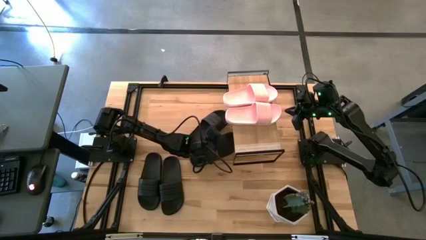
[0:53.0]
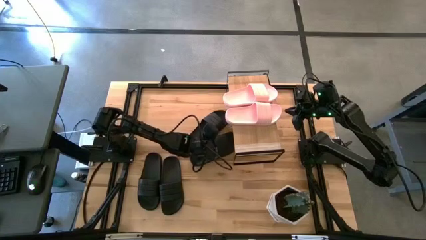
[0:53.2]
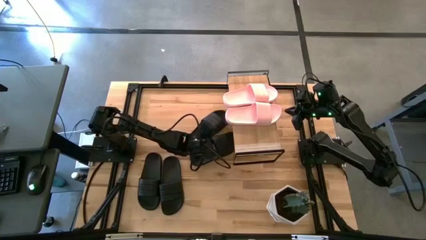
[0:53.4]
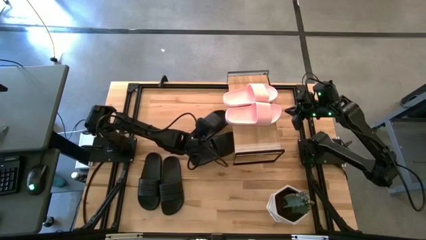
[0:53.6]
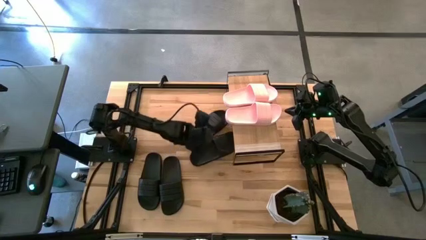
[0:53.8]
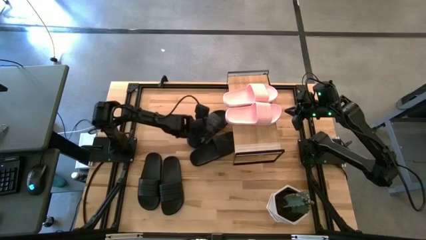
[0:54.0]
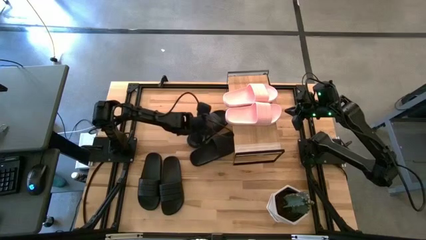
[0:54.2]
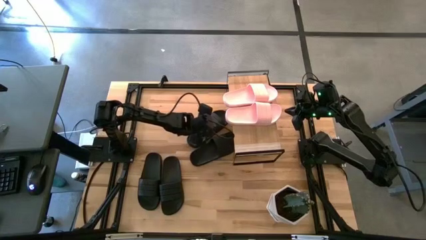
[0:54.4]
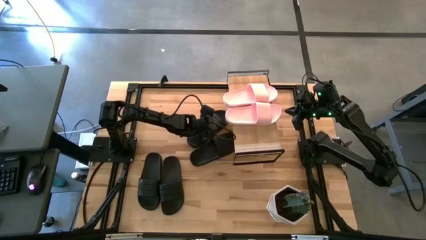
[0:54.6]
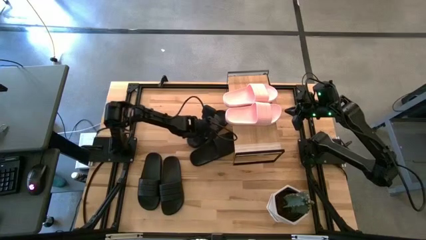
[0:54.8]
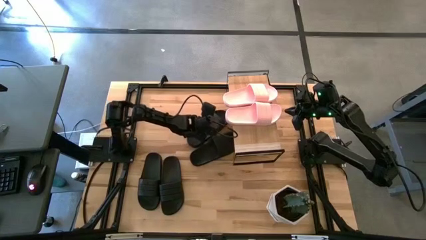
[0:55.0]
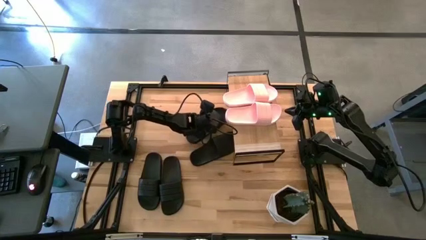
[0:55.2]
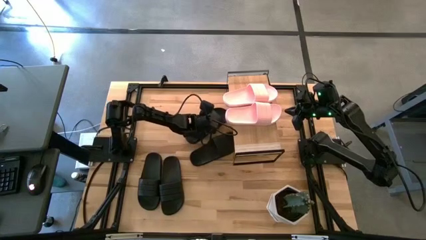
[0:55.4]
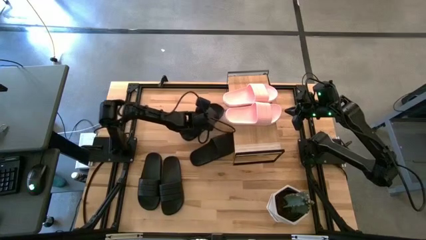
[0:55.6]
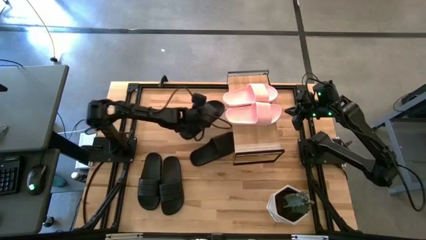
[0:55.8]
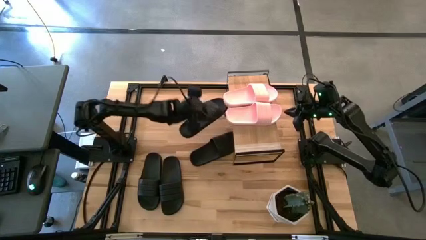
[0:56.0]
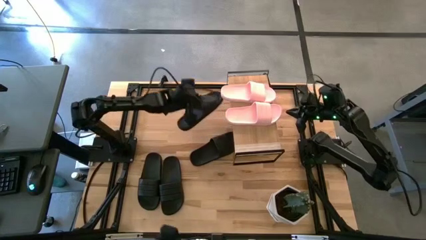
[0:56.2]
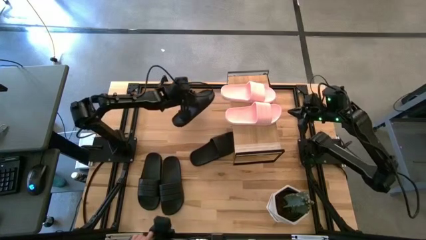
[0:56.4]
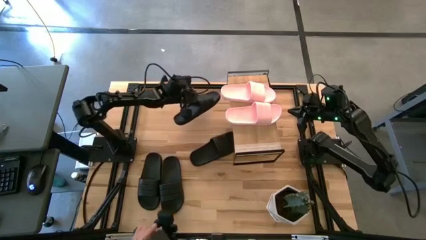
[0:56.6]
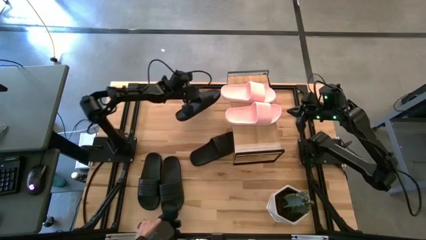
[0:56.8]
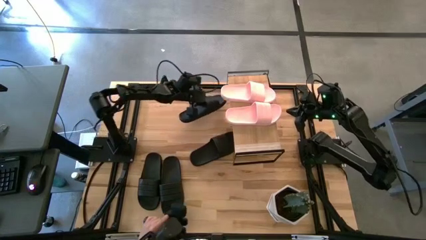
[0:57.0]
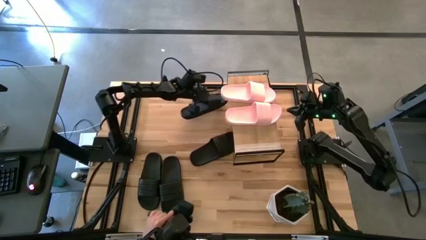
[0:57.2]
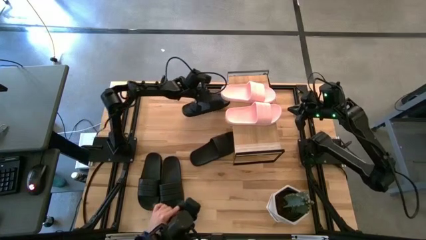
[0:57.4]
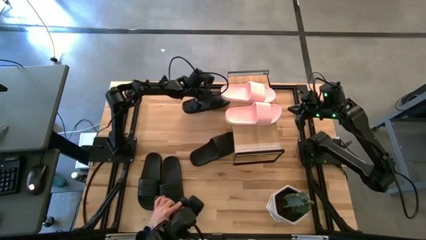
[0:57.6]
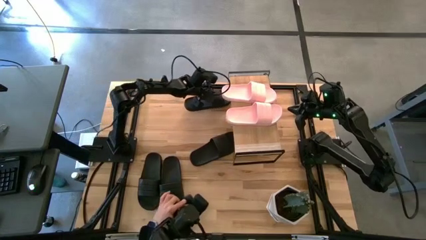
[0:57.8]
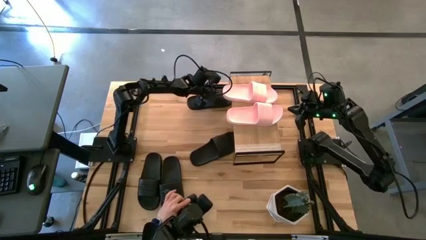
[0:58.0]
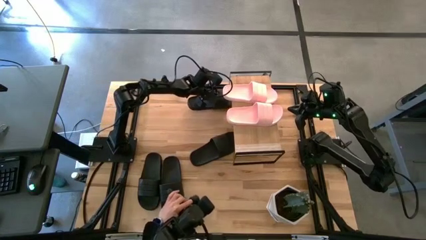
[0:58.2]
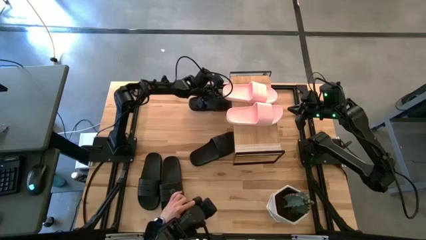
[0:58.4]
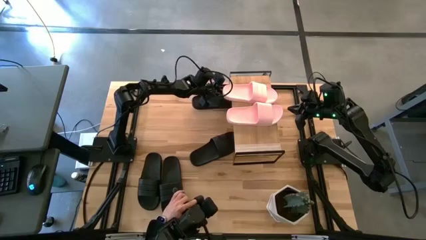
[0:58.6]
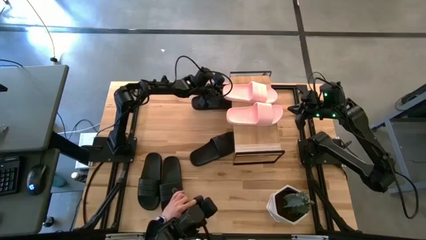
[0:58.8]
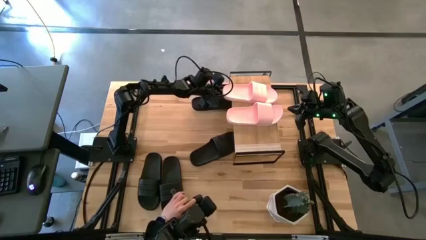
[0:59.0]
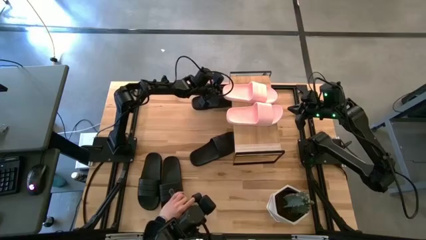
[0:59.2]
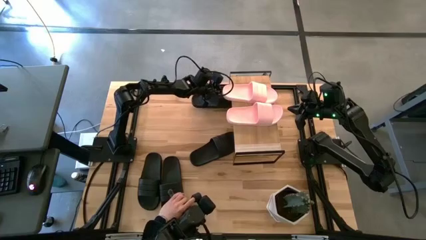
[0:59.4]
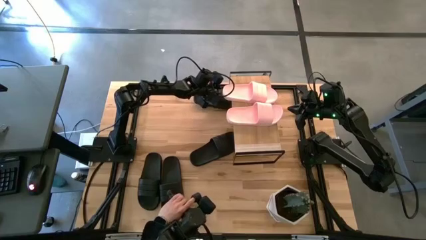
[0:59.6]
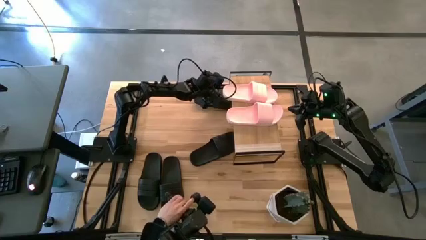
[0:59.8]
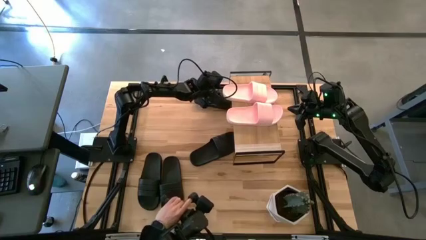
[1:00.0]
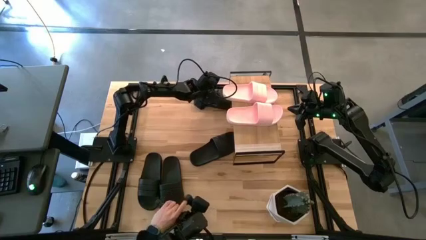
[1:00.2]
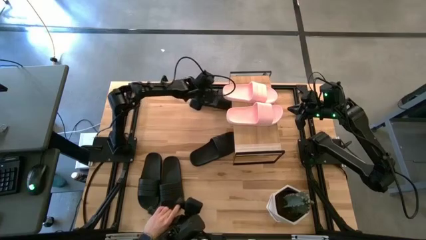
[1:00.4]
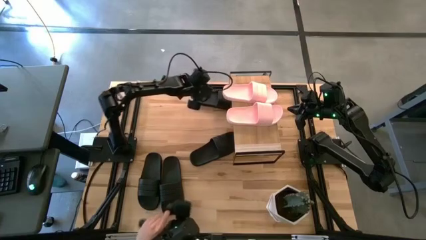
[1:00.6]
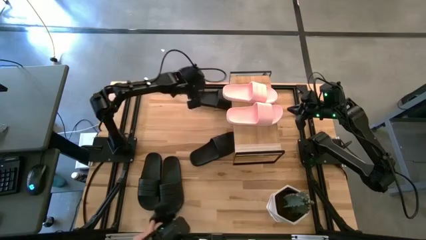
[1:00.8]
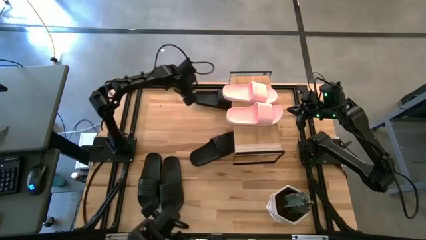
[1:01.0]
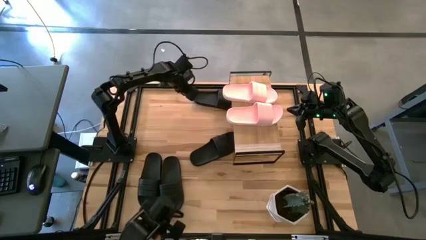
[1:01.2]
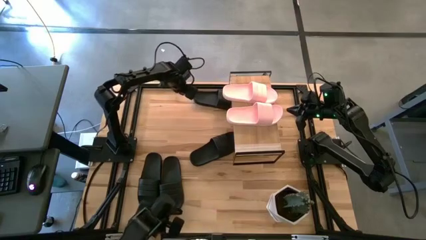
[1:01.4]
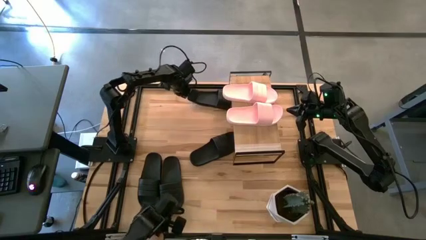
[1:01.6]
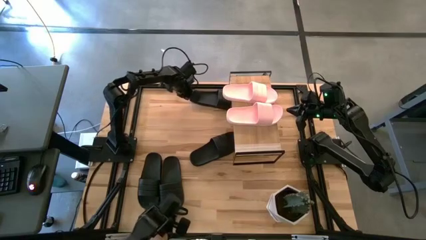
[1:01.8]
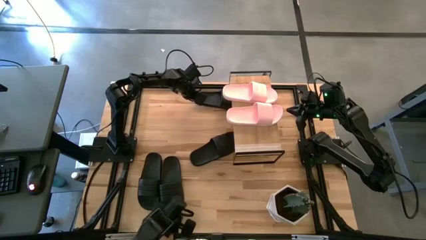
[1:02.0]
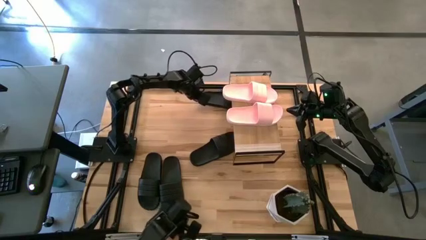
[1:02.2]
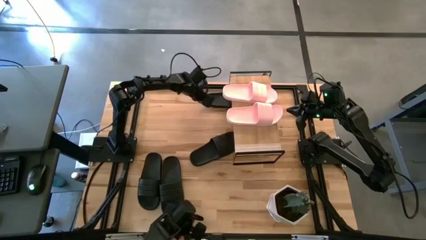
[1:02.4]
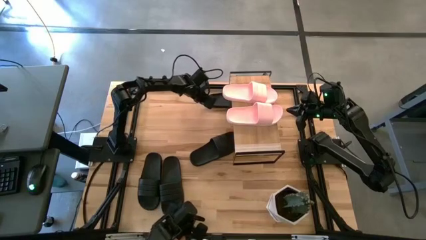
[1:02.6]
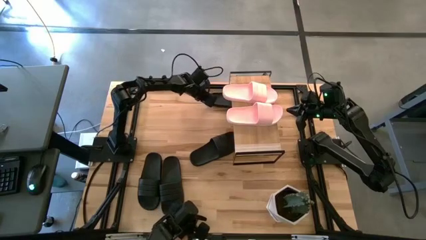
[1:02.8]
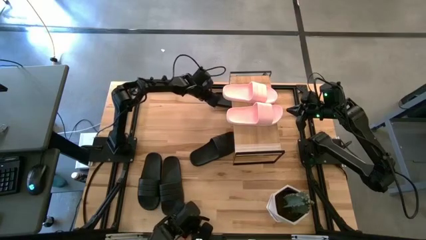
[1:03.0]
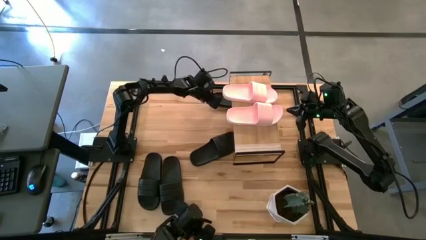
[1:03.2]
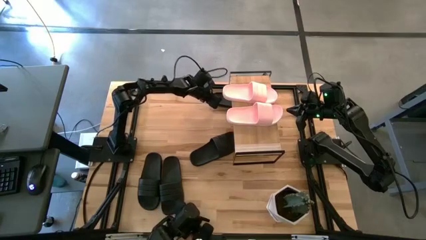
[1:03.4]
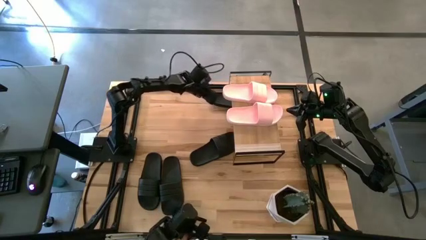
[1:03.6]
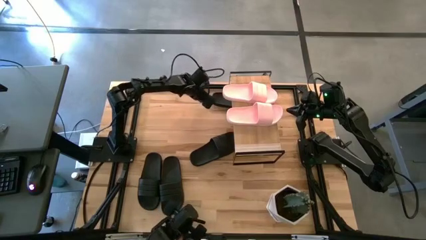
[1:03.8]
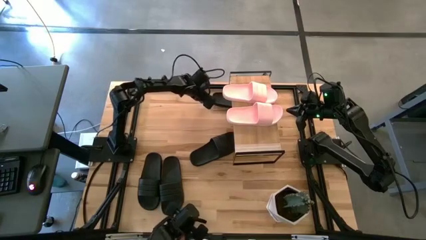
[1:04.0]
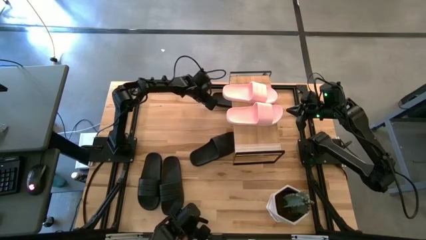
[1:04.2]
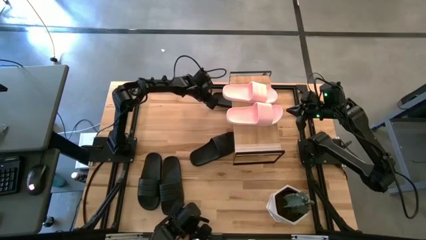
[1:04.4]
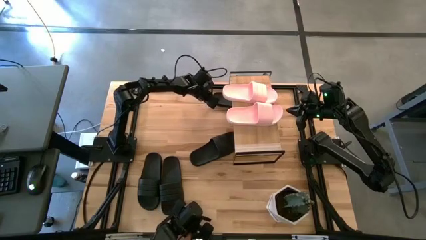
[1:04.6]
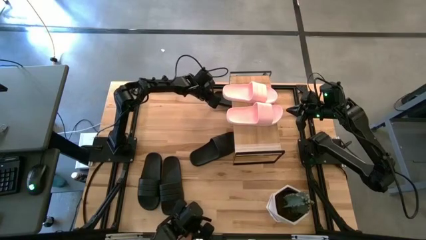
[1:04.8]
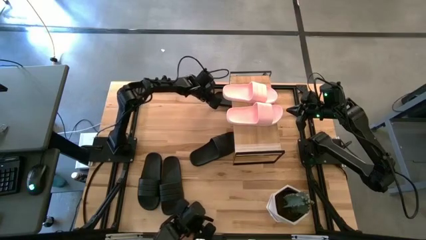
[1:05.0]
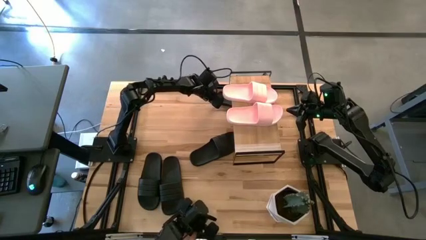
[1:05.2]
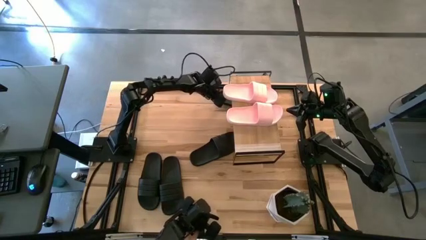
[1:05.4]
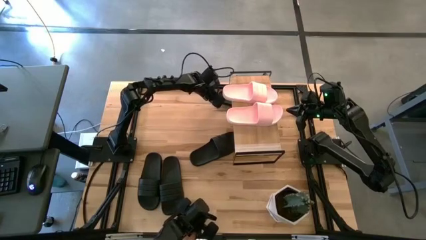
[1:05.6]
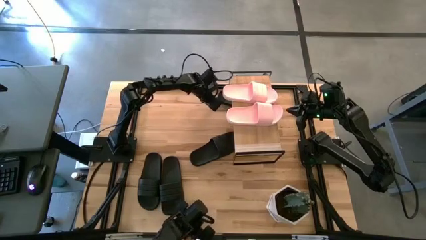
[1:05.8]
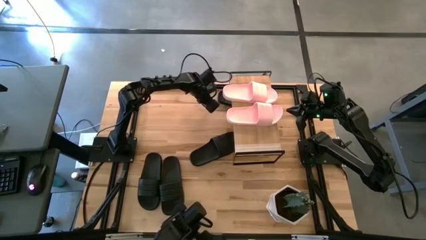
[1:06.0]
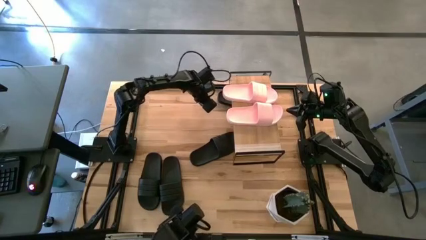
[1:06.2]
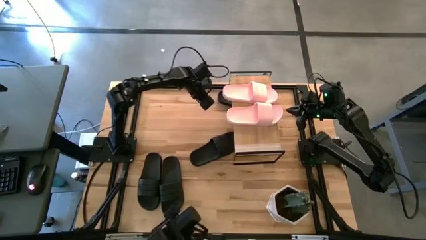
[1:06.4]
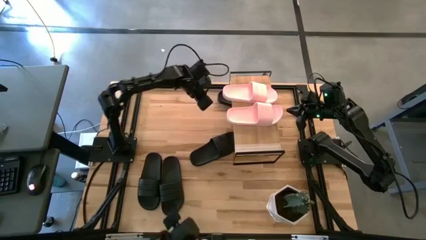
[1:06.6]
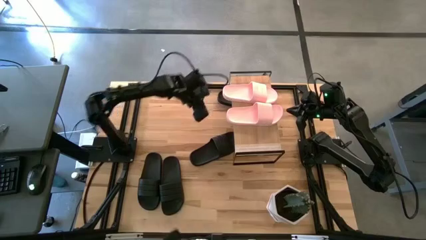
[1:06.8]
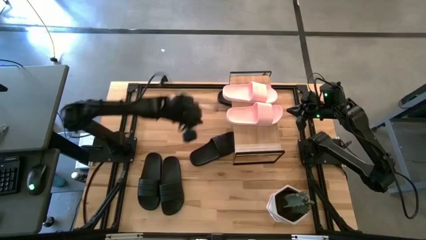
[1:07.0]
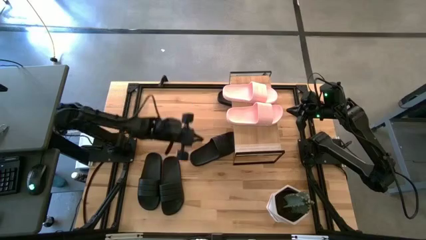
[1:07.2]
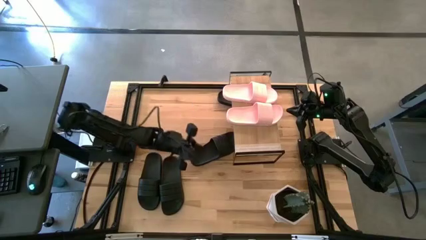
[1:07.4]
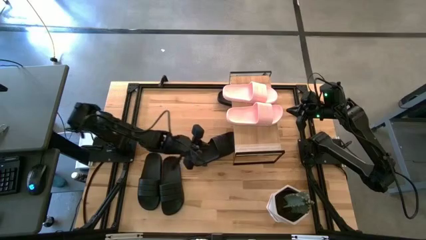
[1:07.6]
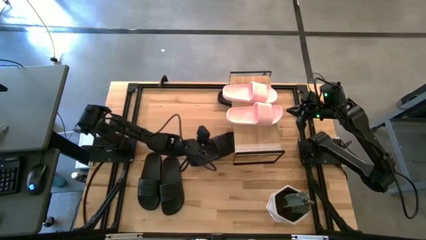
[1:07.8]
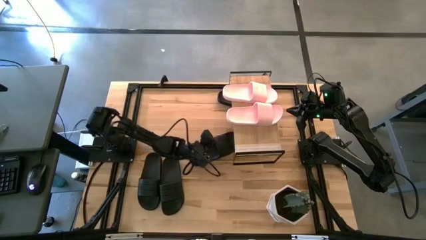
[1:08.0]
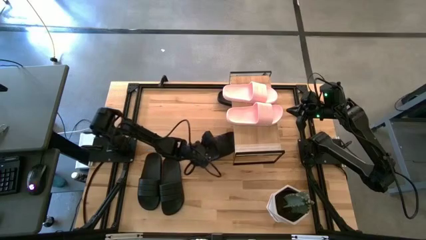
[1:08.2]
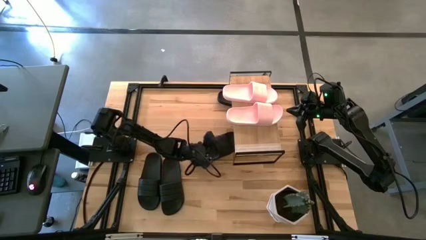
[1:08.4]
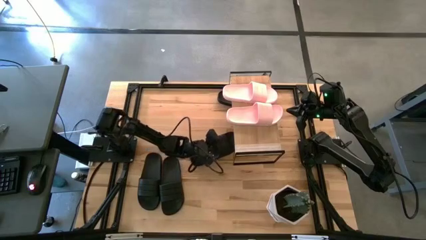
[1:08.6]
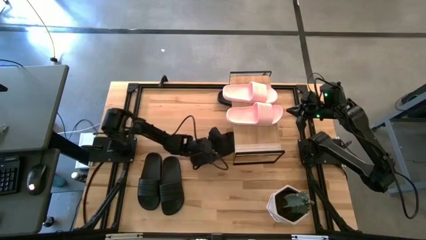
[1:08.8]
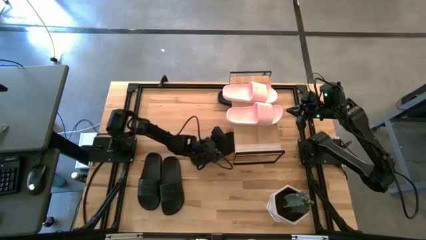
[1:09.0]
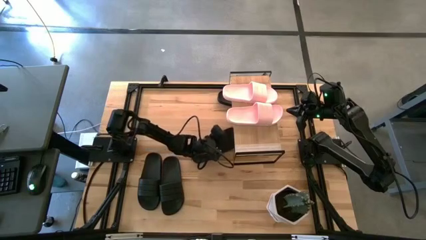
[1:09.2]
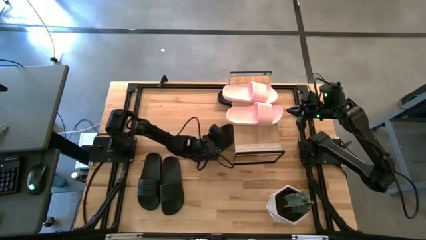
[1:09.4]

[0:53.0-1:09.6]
Task: Pick and place slides into the shelf
Adjust the black slides under the shelf
